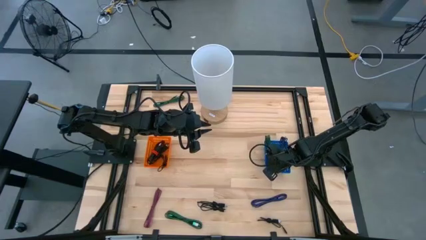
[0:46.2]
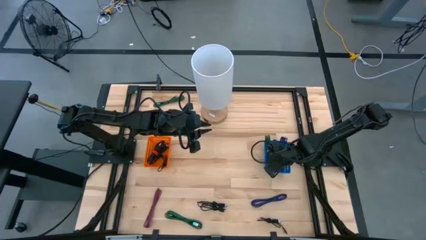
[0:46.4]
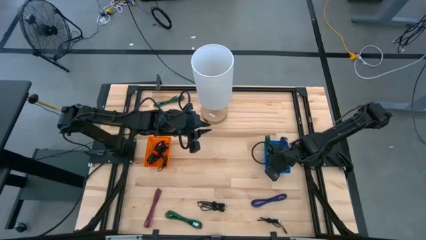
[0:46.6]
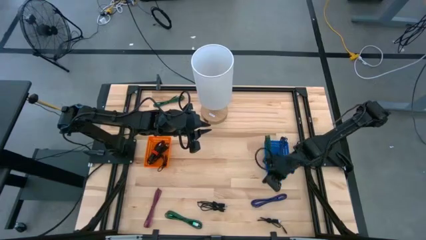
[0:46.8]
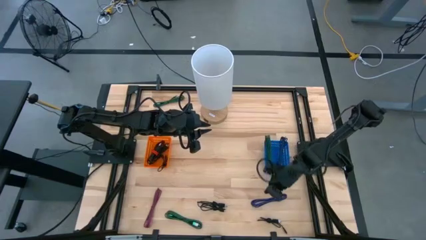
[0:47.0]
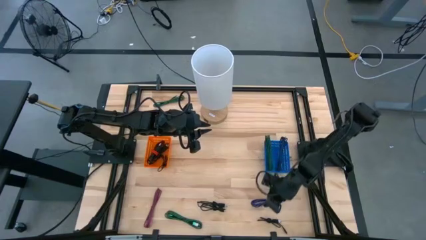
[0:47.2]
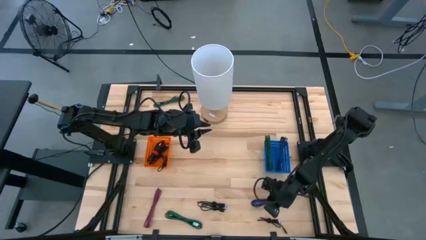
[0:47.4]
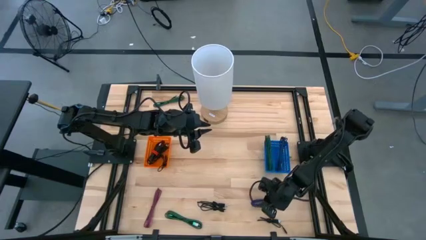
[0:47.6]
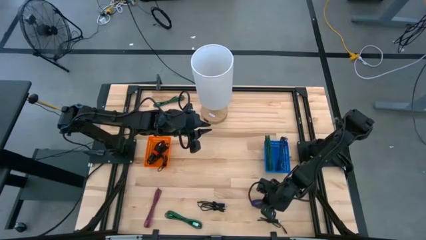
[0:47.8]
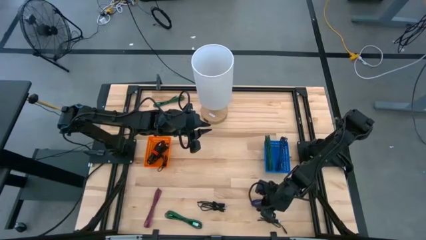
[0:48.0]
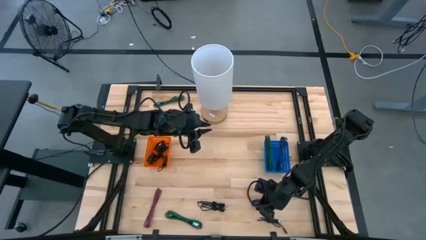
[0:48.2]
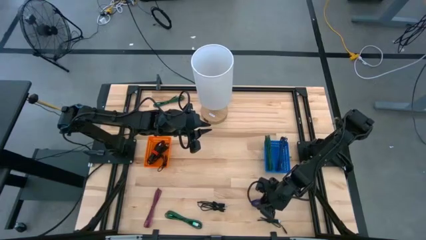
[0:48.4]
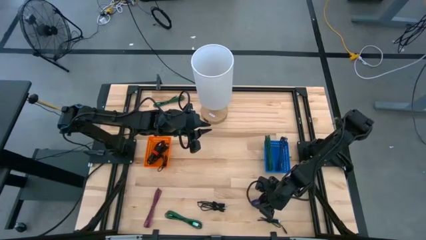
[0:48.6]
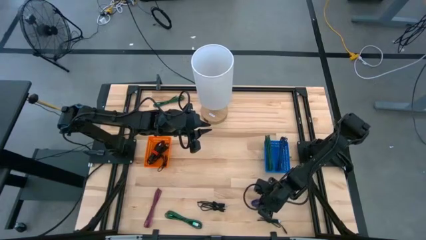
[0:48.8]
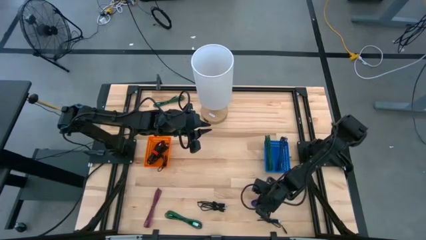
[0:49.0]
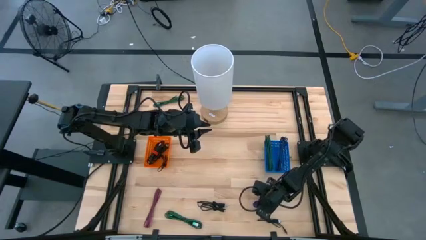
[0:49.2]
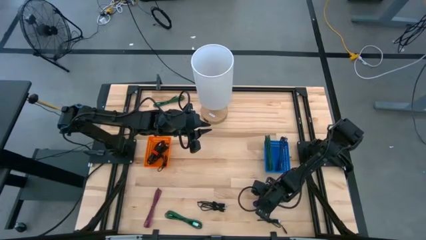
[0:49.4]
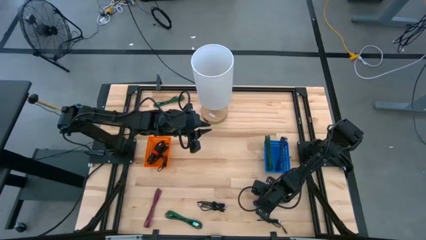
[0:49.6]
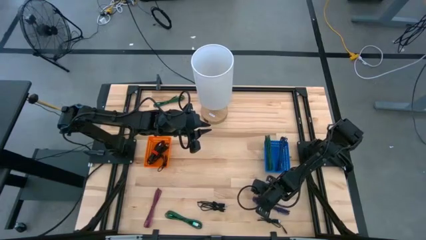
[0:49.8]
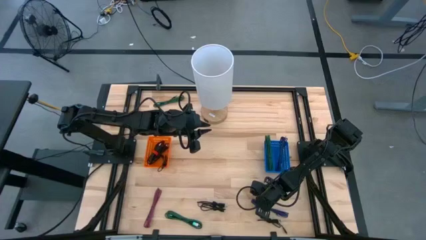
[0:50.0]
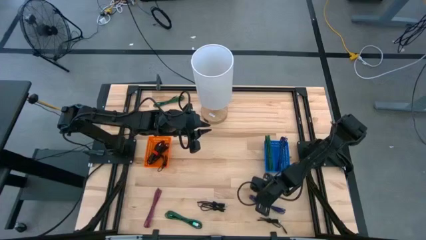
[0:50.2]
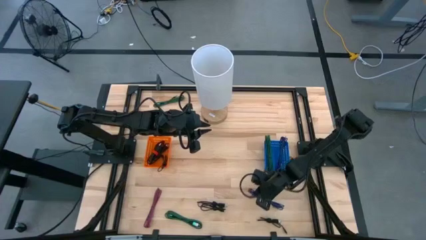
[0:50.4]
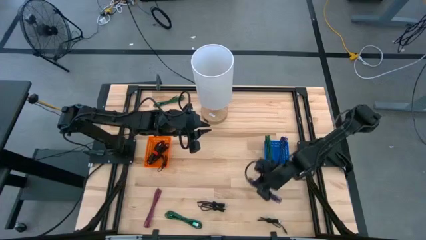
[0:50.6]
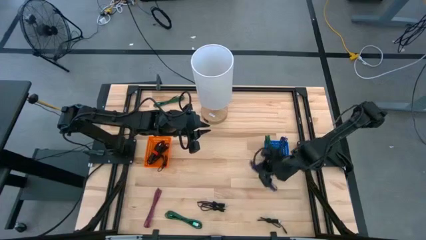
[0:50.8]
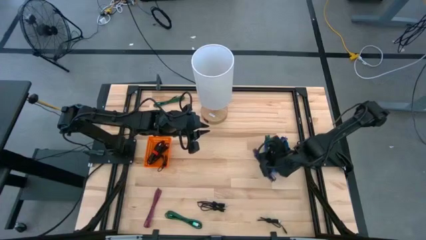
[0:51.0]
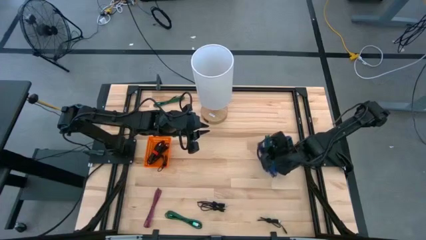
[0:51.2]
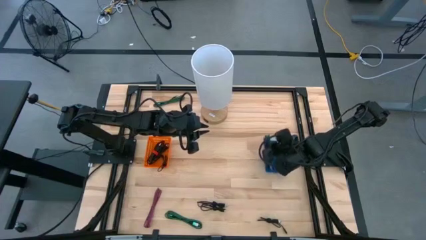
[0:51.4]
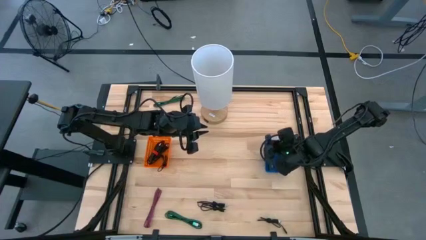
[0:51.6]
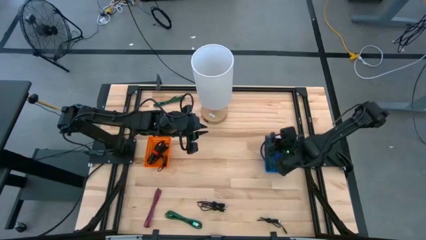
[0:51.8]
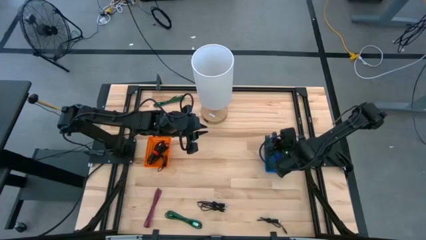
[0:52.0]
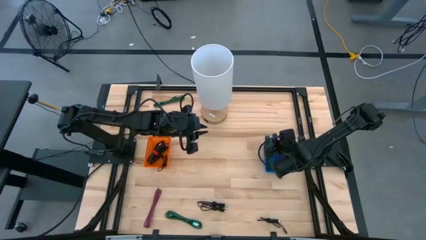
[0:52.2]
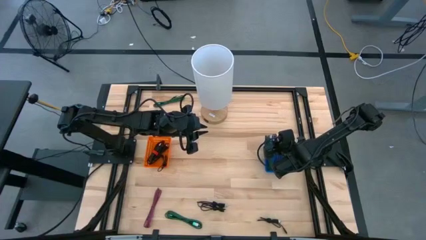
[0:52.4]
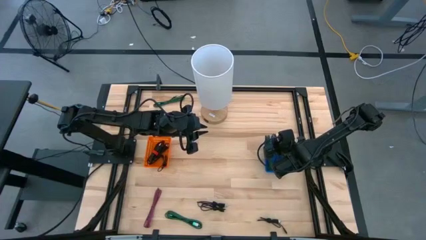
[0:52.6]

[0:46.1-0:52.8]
Task: Pick & Place USB Port
Put the purple charger cable into the blue bin

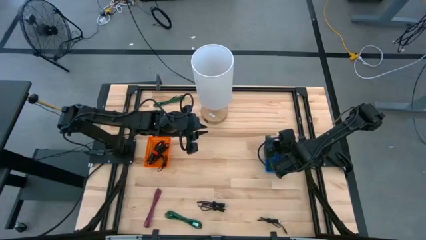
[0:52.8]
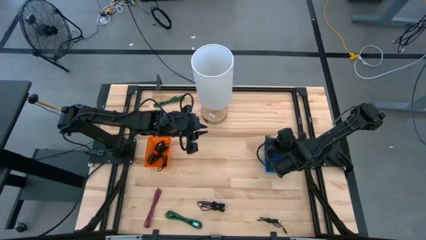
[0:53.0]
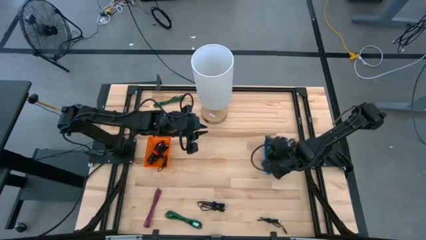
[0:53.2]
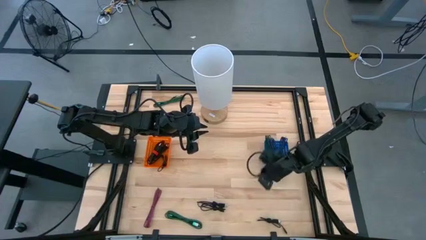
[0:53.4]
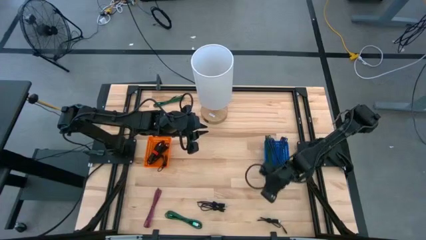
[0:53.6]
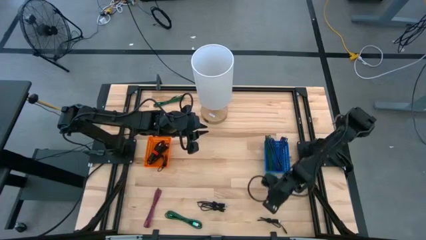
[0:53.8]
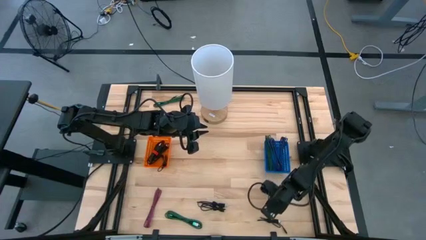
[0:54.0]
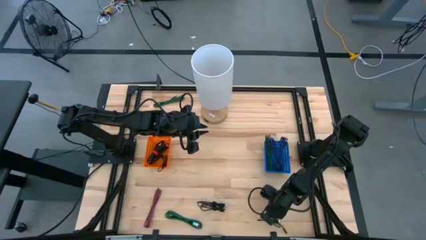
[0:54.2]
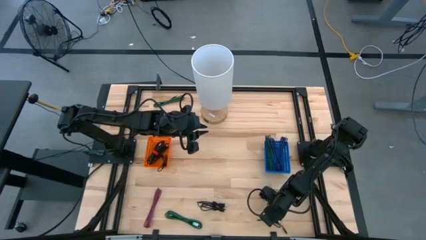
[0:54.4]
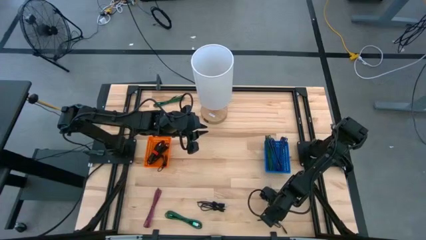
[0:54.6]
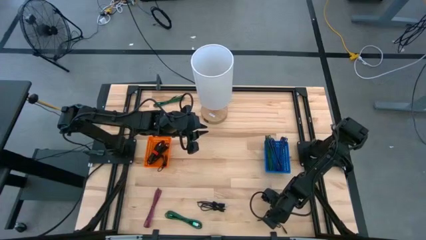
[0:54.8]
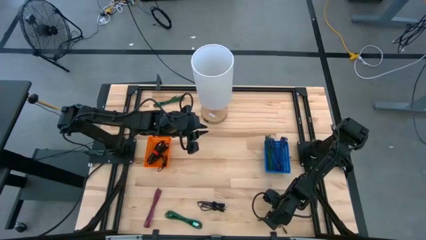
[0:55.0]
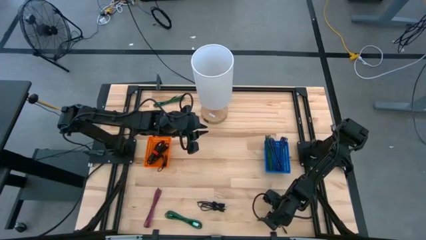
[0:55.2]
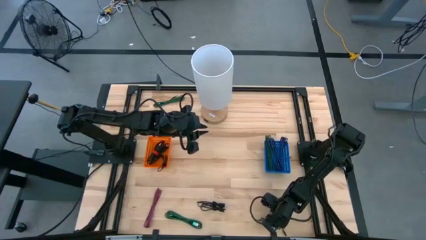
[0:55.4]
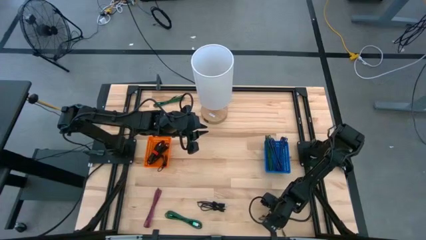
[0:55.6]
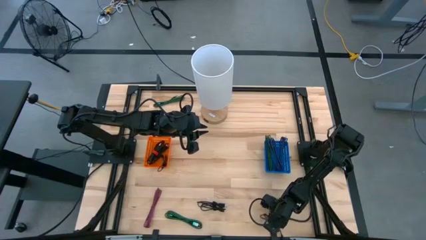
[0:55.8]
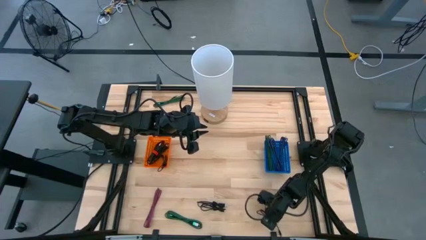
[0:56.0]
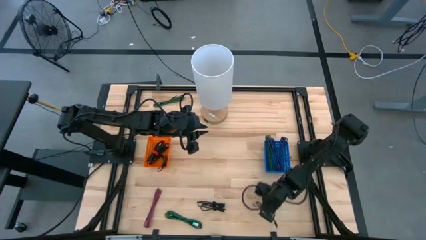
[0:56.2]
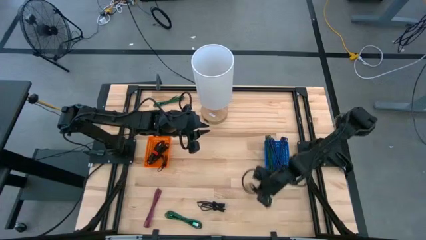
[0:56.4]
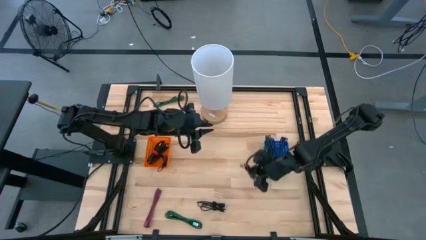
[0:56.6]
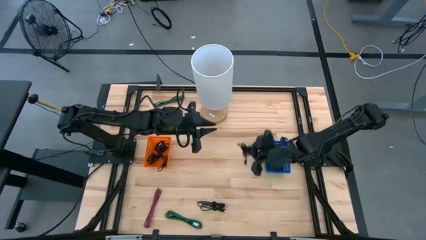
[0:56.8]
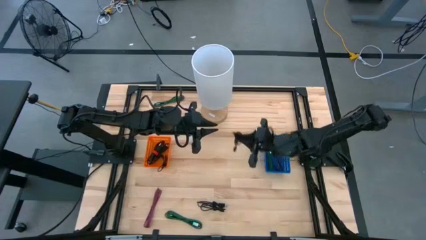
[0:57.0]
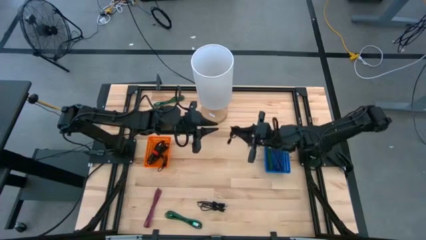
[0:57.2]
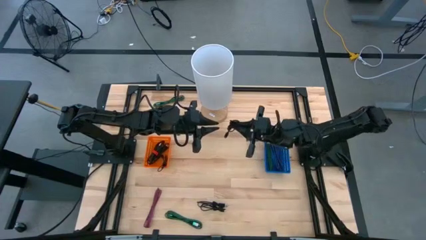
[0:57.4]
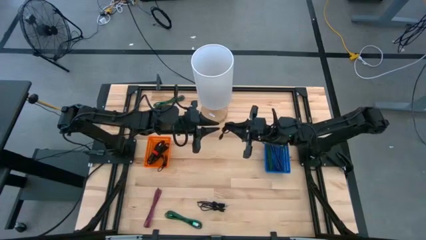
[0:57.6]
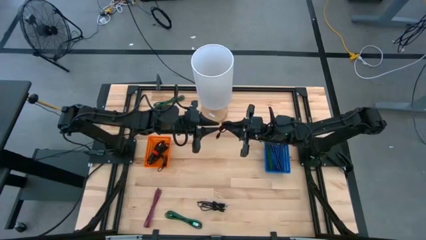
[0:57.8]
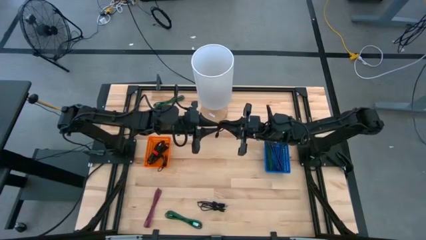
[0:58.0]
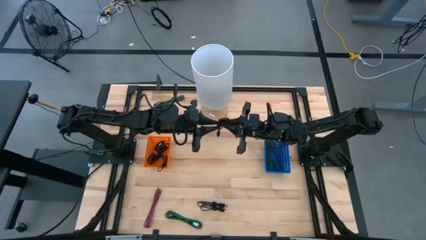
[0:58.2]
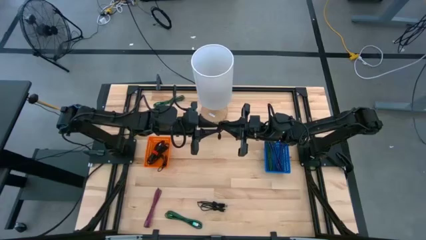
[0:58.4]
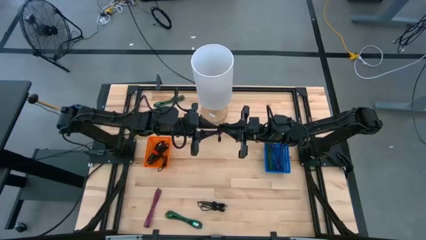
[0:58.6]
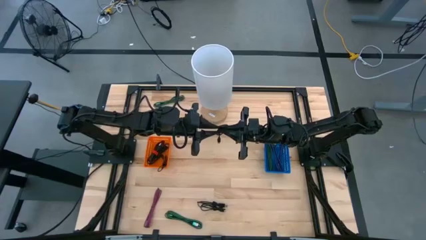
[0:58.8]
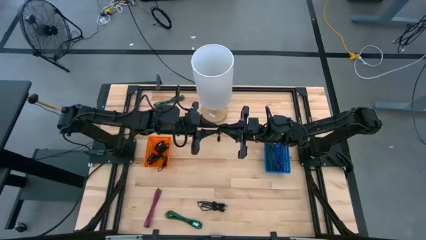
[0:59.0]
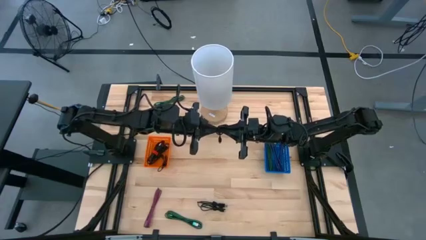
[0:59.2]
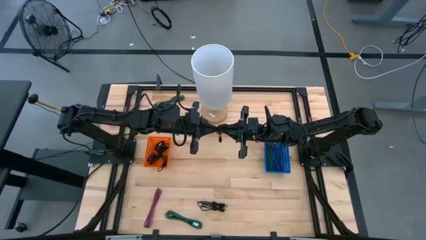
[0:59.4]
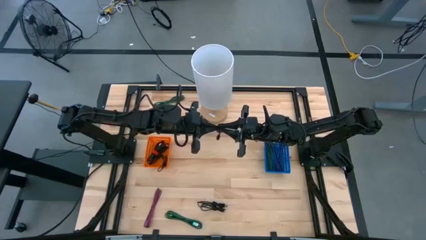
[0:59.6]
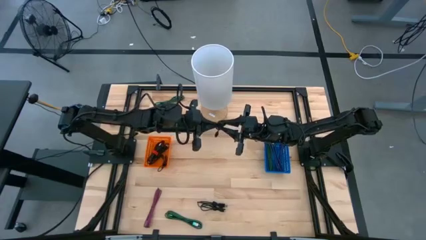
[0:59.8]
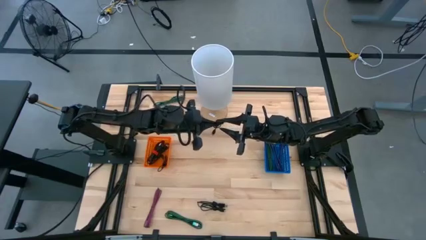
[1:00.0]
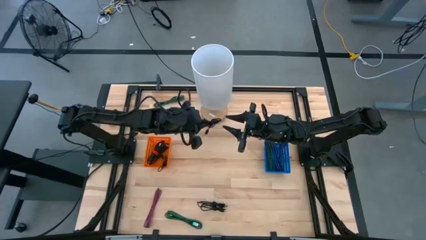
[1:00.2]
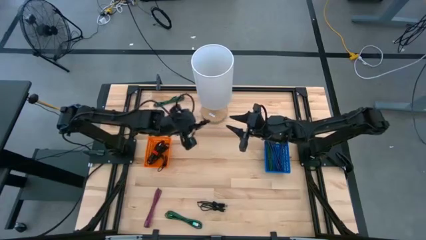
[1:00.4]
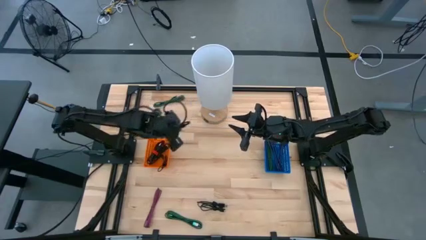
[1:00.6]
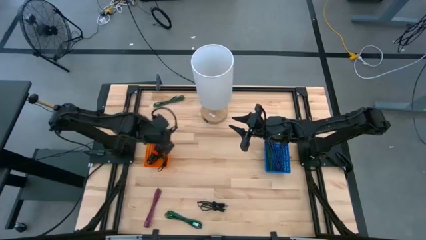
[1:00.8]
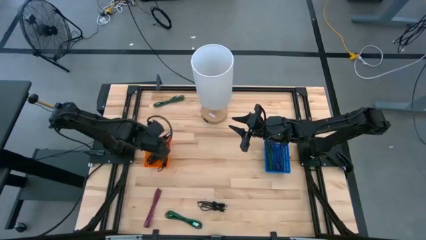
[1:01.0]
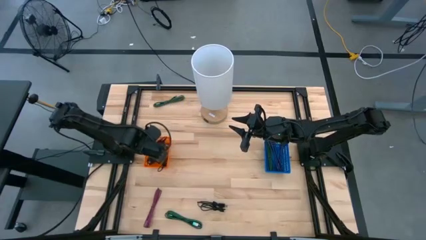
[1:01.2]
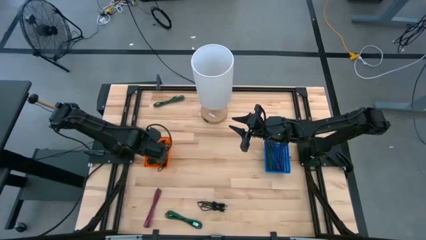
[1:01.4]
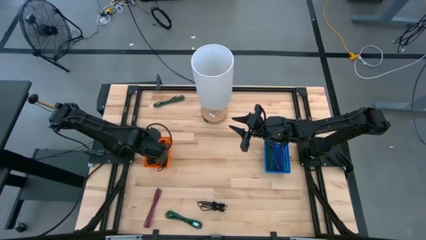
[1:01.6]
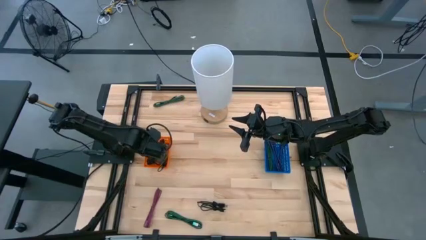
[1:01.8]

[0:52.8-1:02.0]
Put the black charger cable into the orange bin
